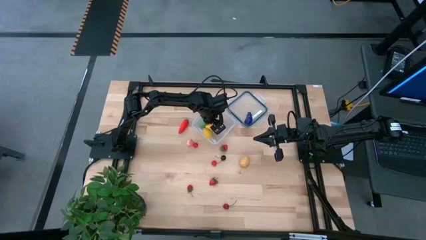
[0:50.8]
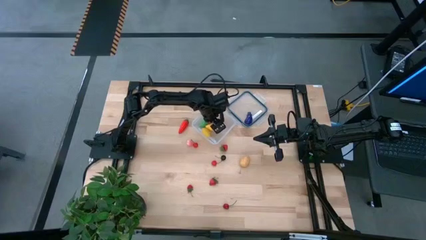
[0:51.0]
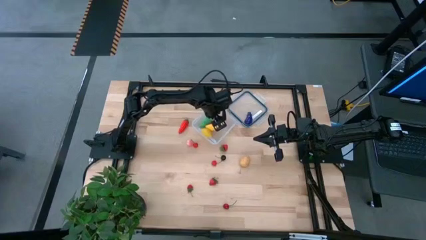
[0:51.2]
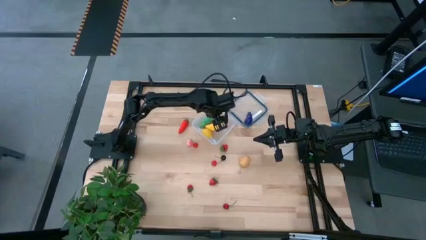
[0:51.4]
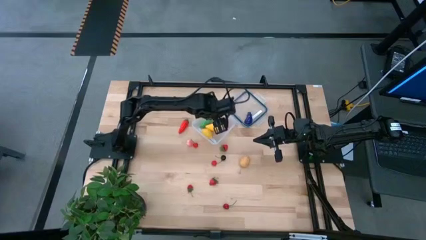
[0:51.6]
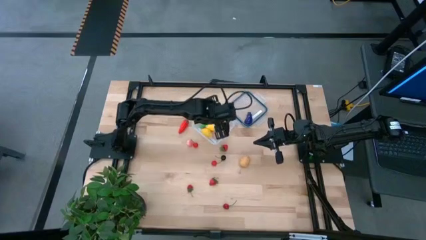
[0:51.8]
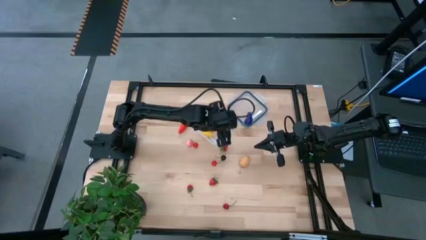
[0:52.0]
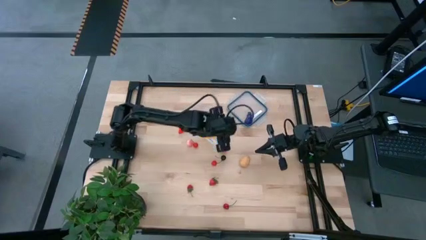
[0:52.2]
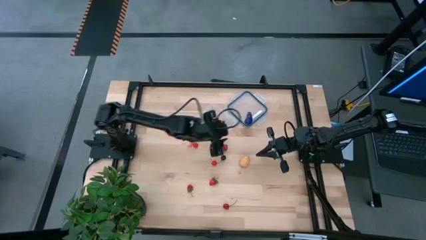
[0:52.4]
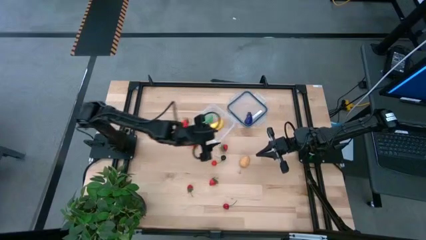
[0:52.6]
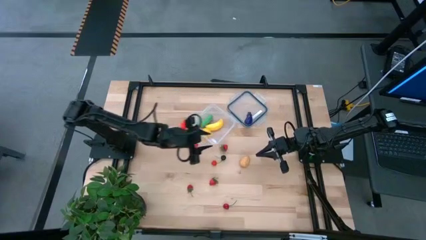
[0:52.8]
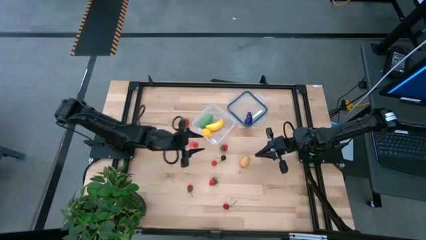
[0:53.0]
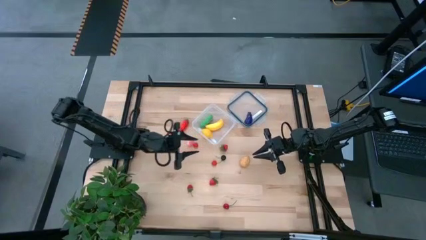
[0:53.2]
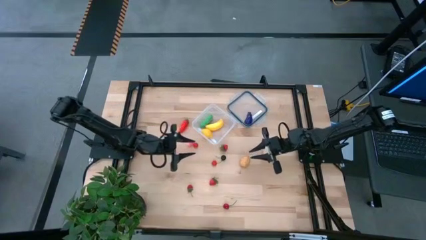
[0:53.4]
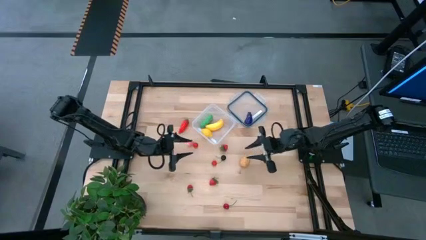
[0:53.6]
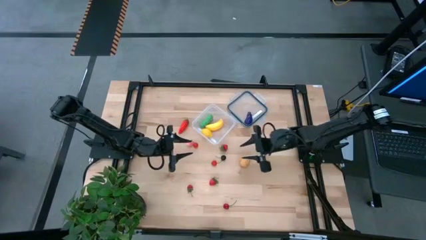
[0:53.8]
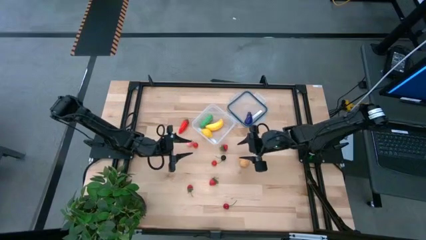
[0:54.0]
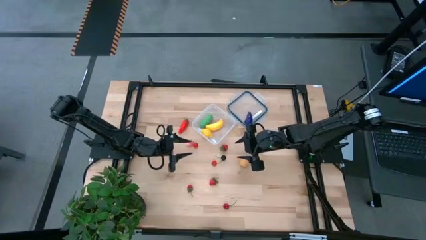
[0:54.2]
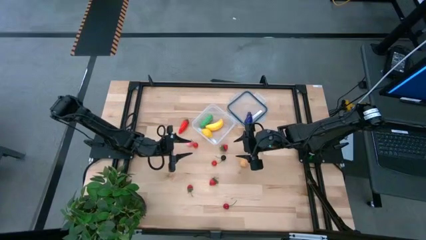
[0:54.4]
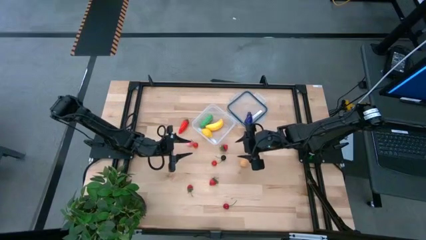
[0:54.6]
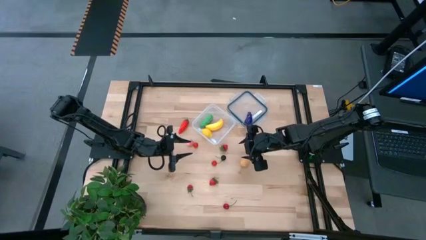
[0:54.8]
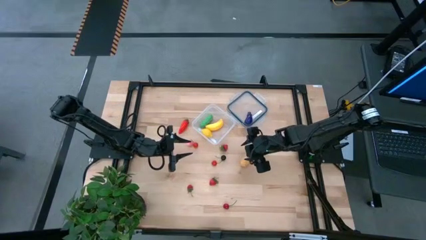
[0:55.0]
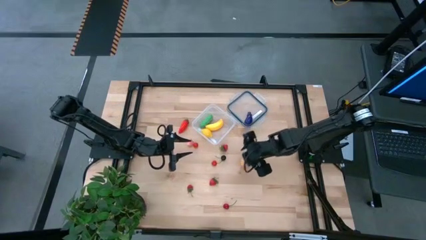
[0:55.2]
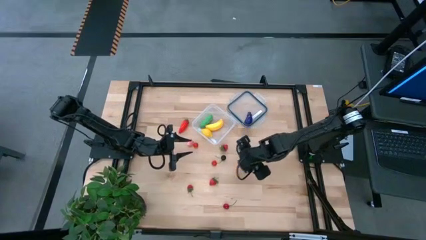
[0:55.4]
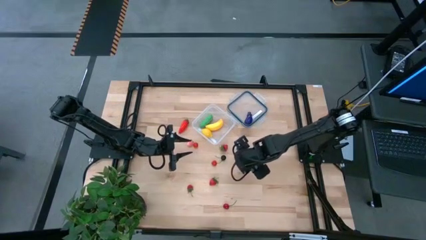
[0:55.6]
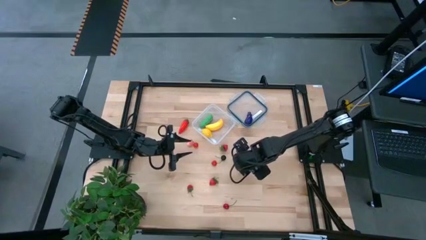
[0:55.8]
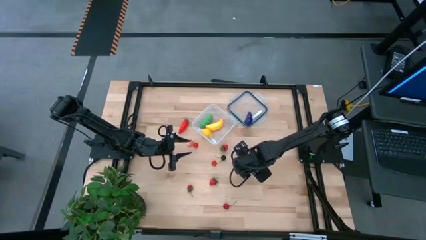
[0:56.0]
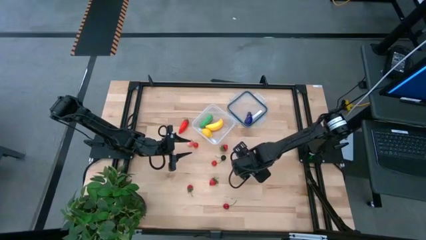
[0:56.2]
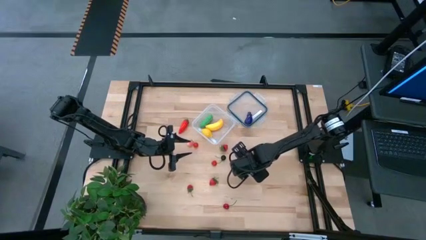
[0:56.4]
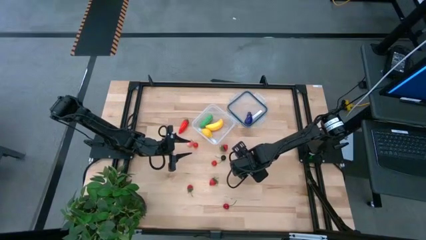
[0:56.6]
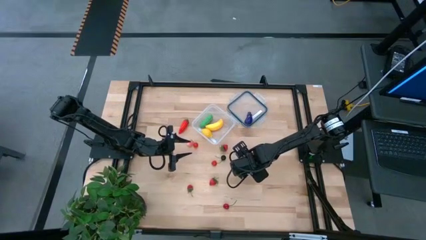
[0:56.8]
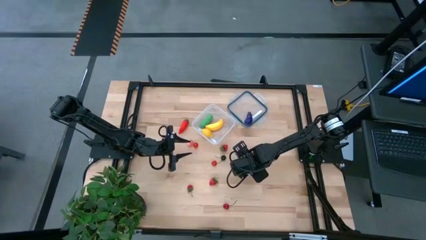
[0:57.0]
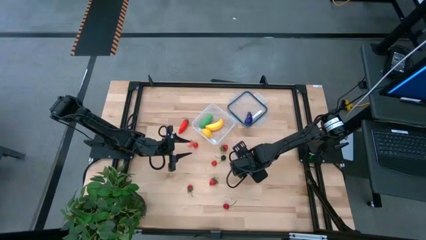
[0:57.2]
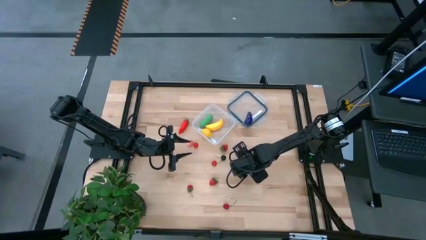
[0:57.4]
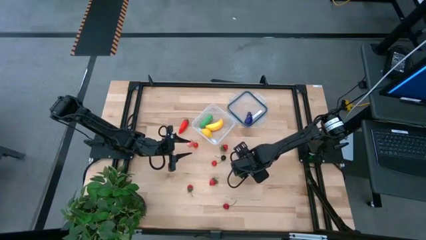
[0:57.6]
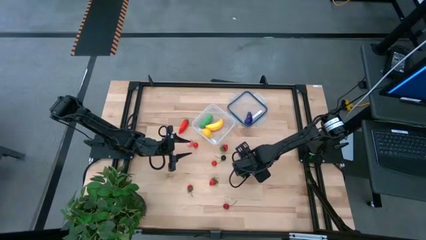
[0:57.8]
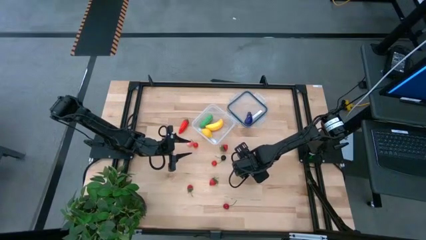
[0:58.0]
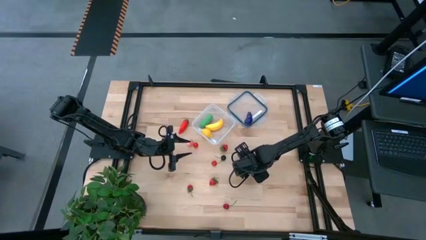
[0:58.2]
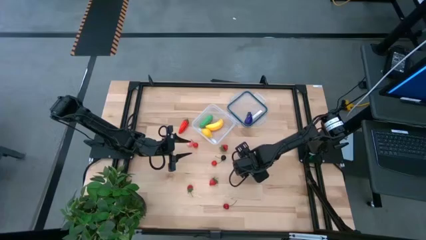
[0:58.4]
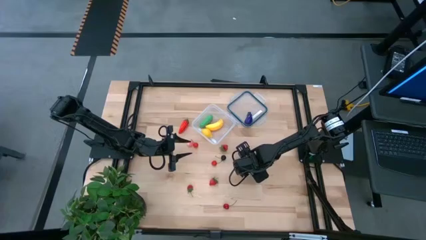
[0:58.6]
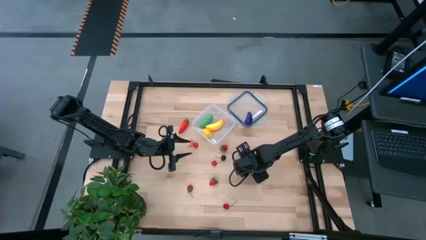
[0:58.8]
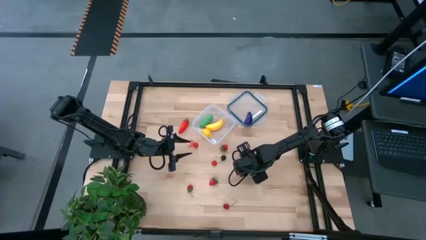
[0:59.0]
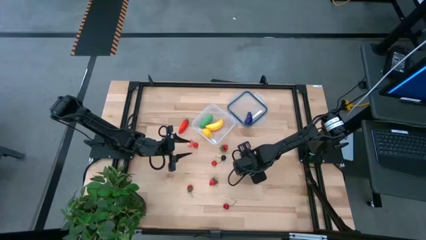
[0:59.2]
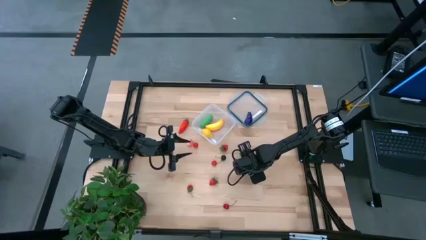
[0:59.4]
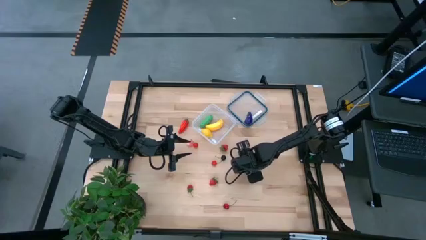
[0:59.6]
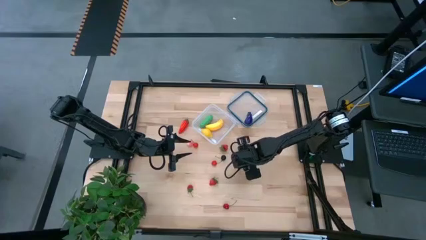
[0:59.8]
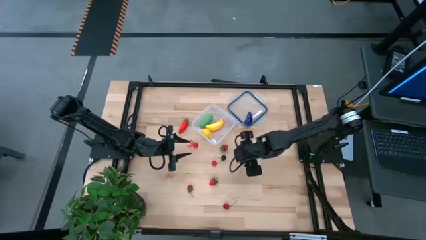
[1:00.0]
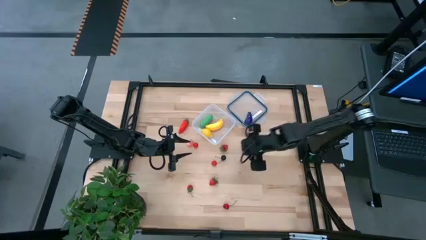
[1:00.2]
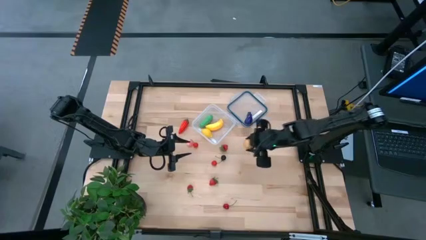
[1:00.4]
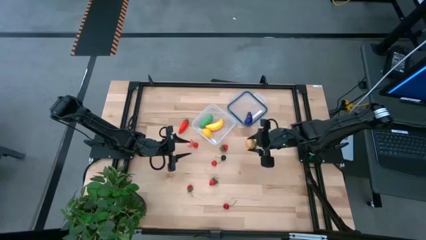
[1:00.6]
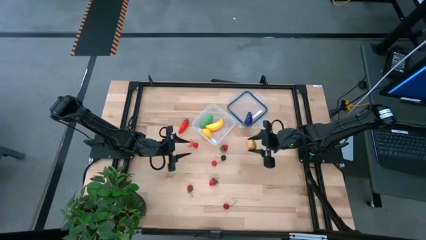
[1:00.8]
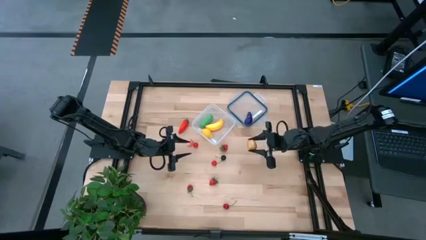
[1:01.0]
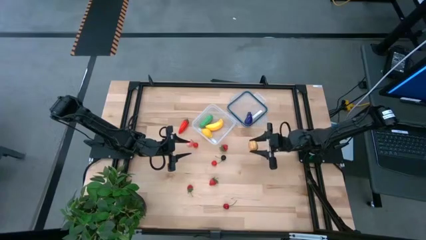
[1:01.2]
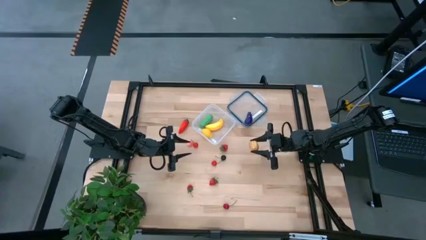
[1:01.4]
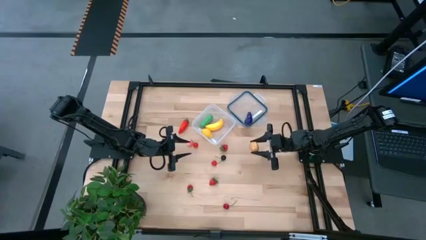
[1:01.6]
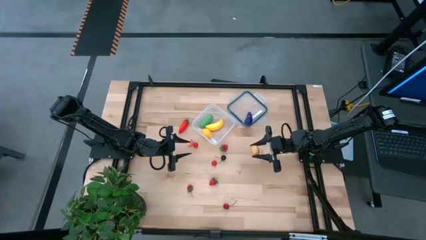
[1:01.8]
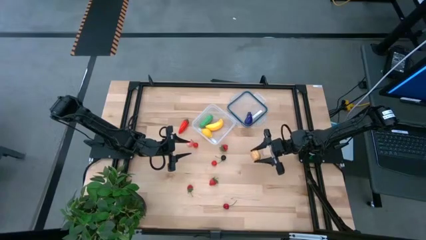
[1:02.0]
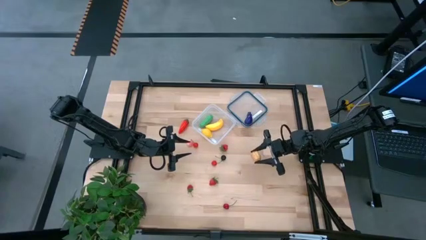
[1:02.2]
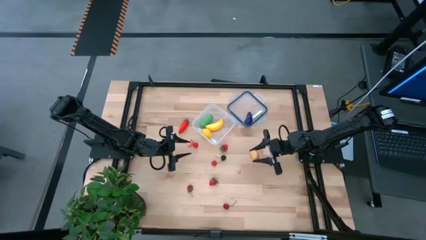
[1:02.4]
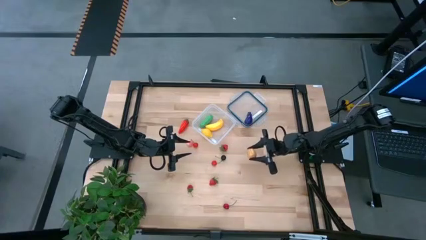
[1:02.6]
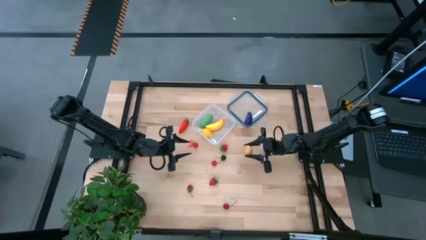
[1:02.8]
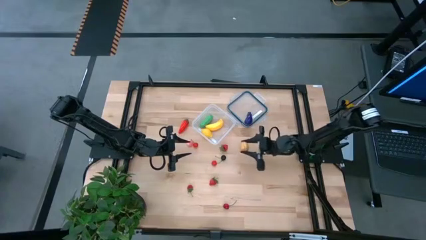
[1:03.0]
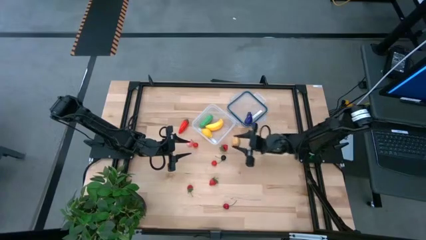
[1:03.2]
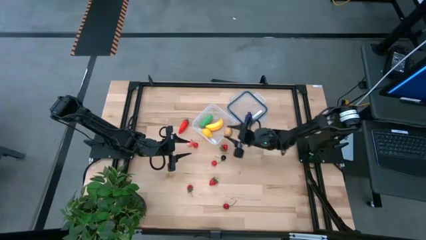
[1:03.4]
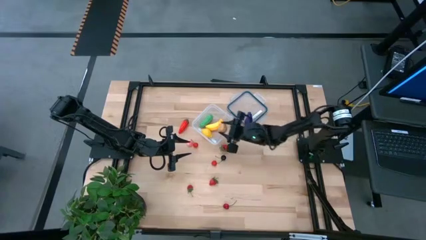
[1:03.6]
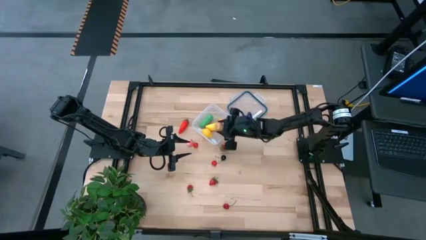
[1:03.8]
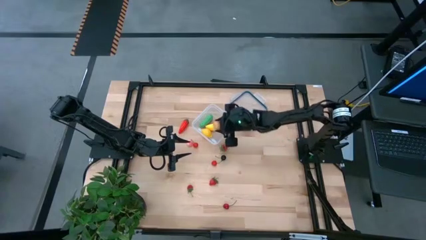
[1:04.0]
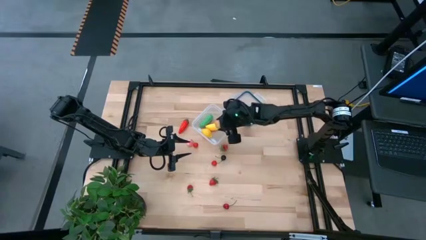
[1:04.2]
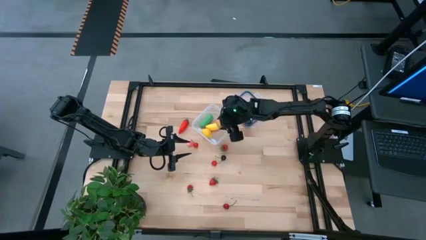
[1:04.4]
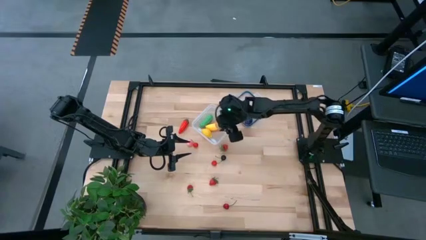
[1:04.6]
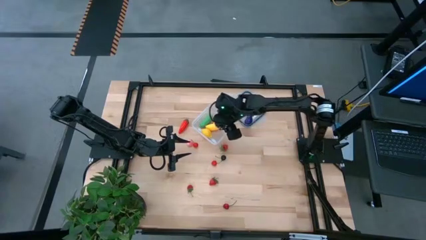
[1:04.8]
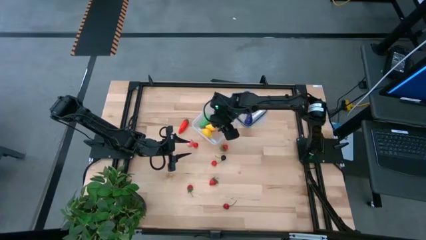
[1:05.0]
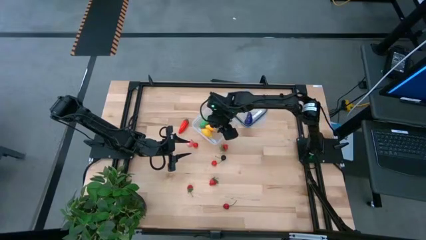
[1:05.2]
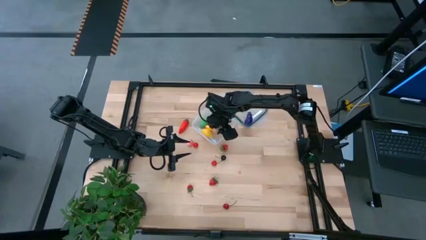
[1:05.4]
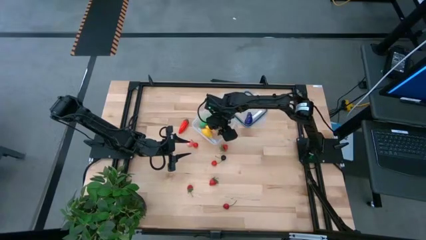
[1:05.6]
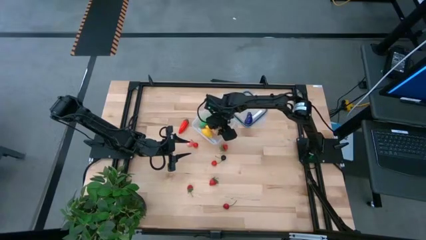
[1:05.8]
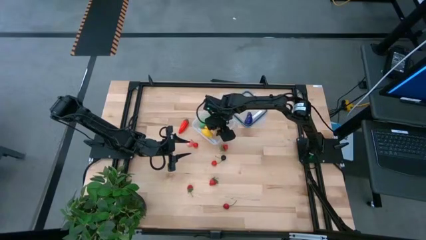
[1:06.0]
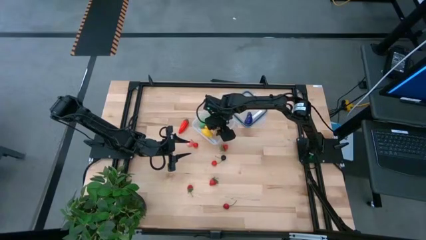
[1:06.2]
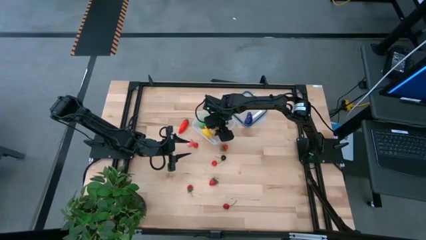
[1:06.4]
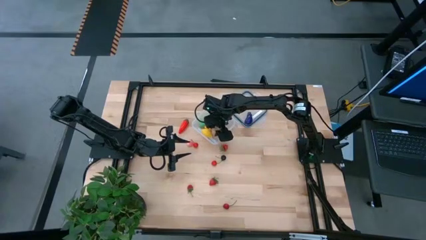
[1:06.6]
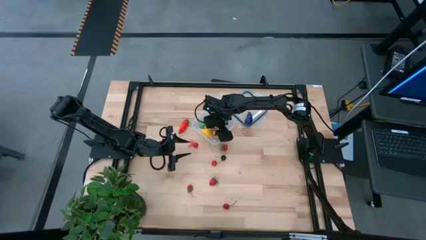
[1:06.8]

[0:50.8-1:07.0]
Task: Pick and placing Produce into tupperware
Put the brown potato into the transparent container

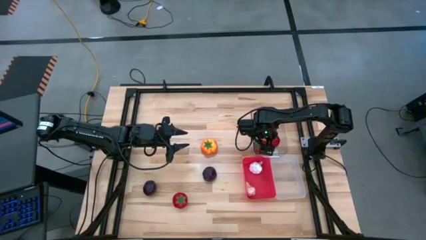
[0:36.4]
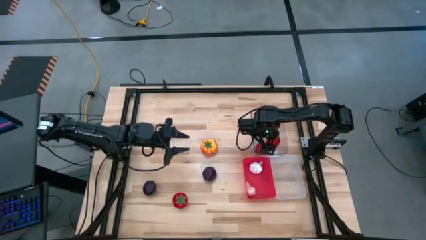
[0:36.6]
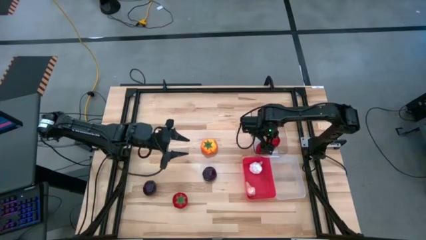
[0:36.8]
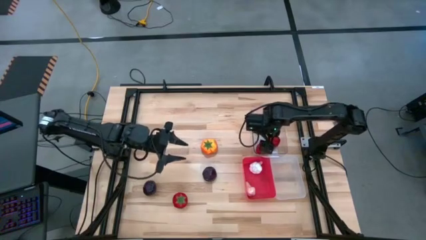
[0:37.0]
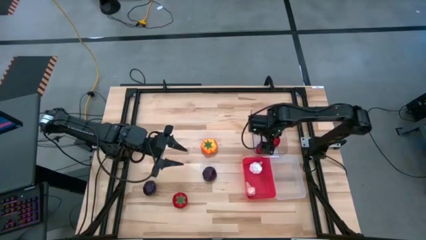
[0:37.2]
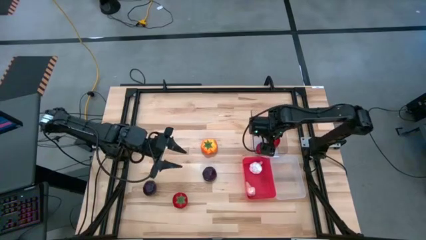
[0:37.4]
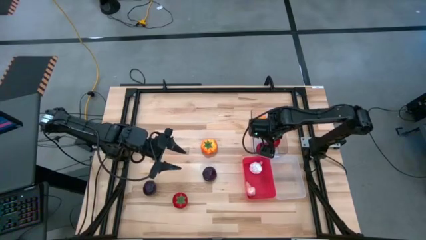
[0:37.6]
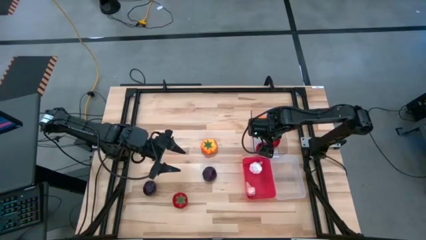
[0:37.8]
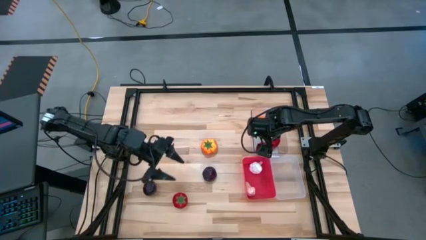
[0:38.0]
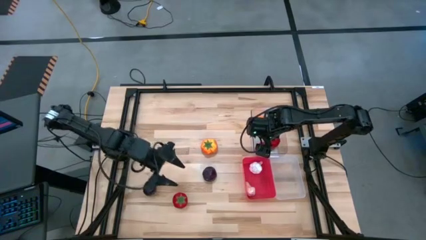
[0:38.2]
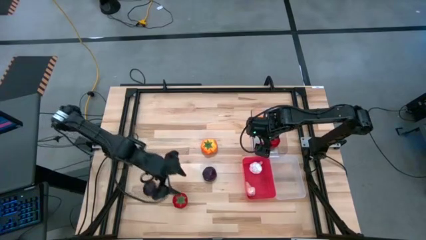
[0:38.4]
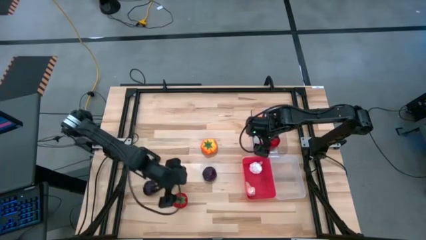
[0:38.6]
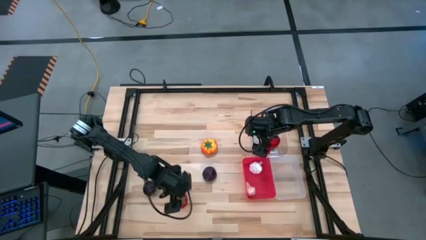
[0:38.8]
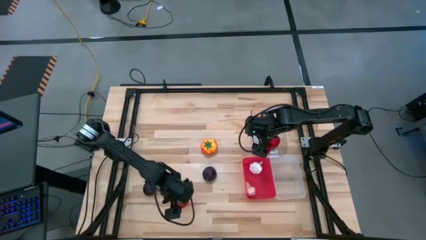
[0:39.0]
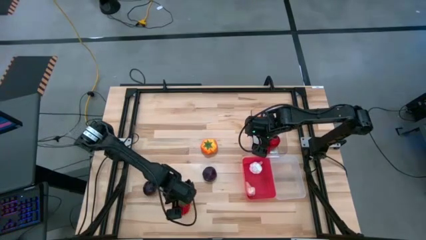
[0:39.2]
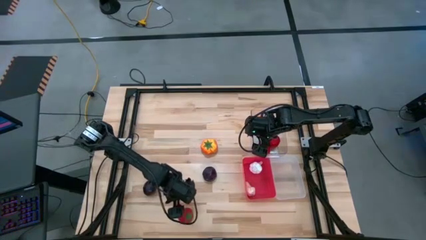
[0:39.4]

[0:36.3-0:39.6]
Task: Sort produce into baskets
Put the red tomato into the top transparent bin
